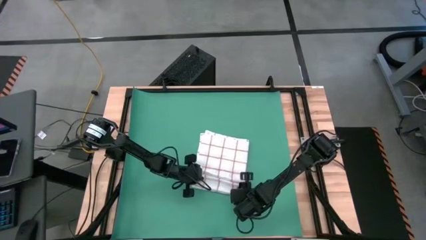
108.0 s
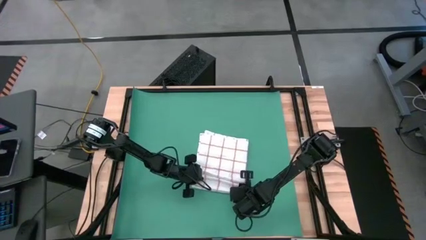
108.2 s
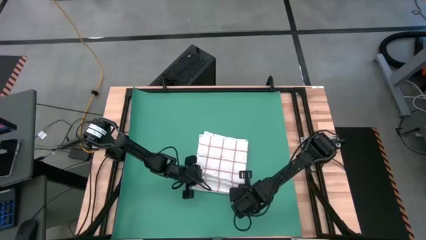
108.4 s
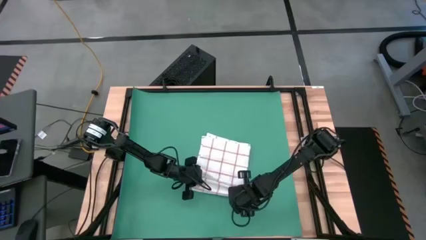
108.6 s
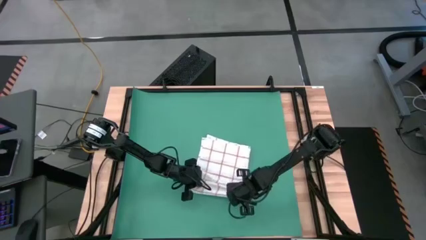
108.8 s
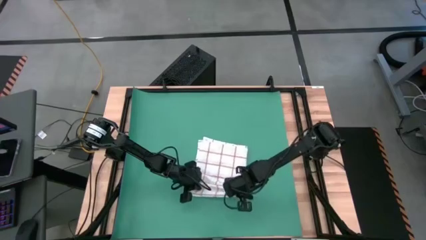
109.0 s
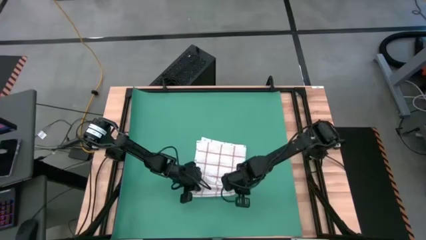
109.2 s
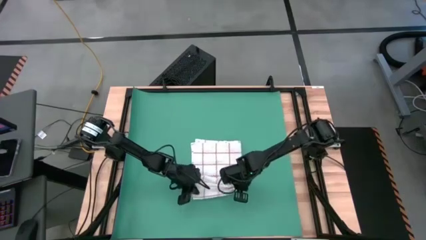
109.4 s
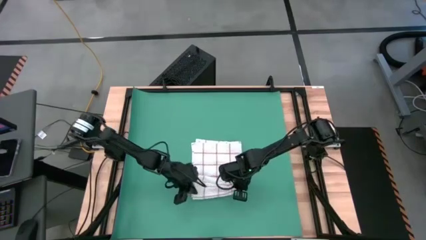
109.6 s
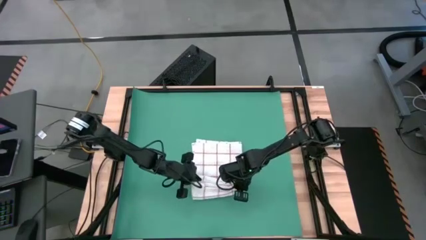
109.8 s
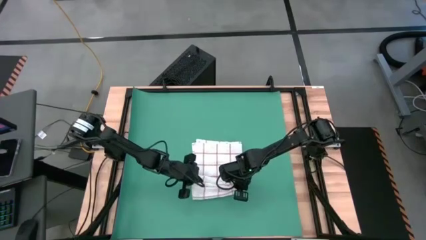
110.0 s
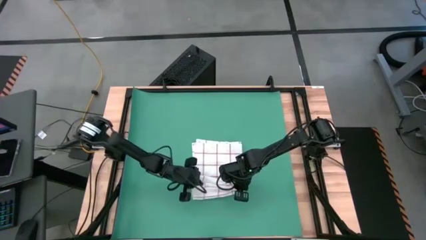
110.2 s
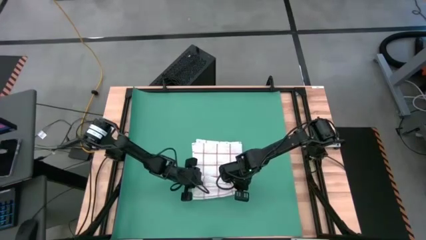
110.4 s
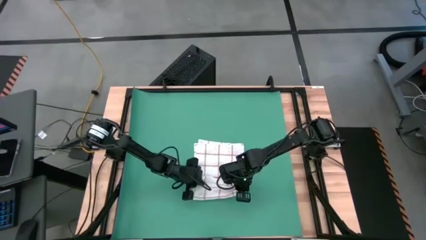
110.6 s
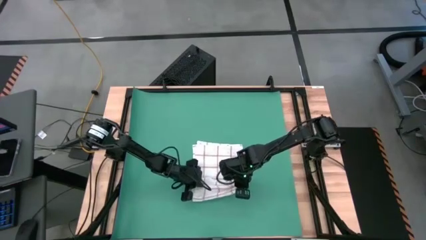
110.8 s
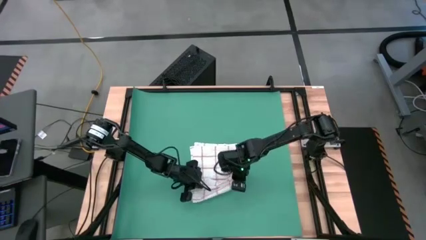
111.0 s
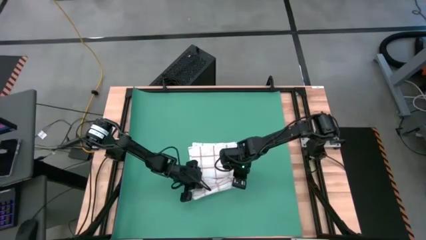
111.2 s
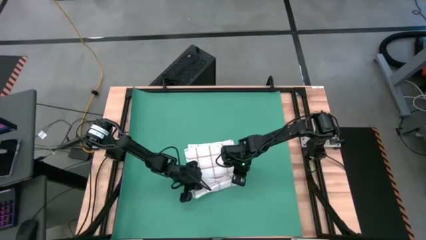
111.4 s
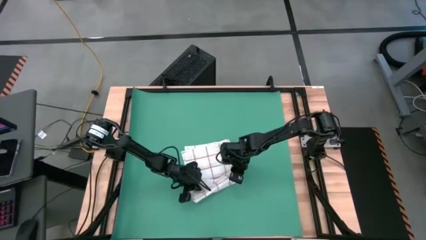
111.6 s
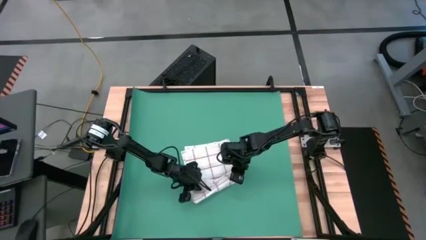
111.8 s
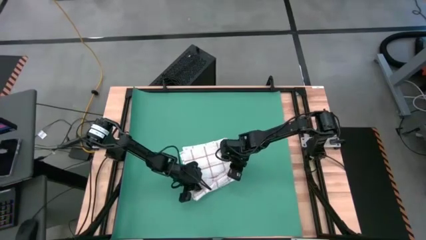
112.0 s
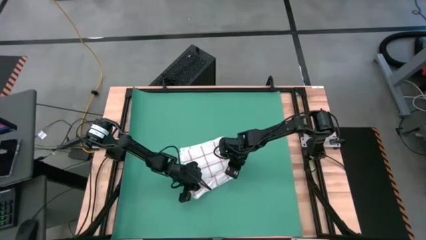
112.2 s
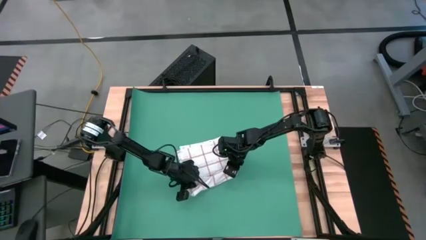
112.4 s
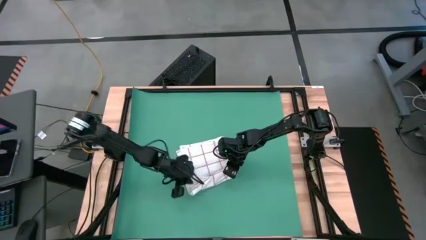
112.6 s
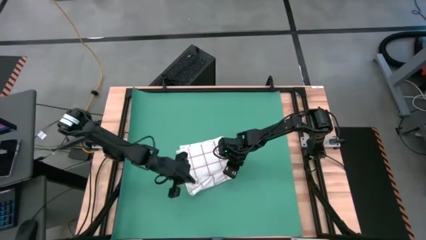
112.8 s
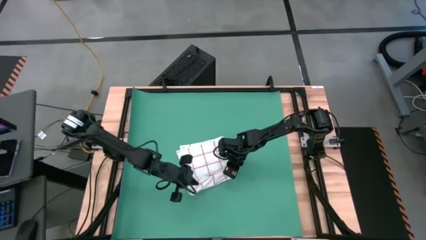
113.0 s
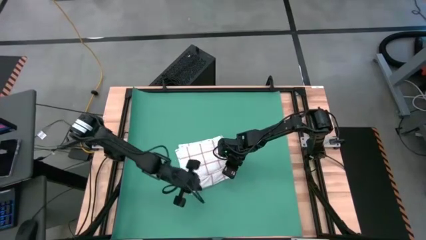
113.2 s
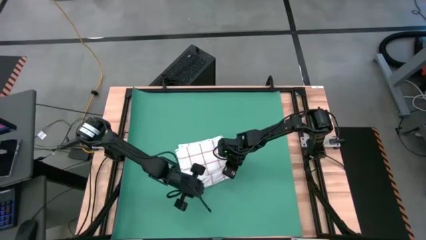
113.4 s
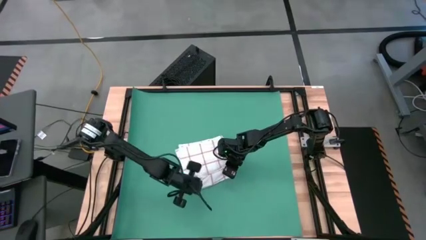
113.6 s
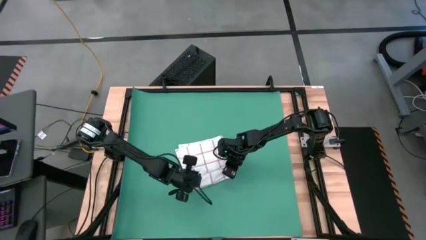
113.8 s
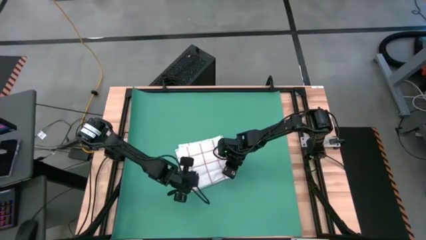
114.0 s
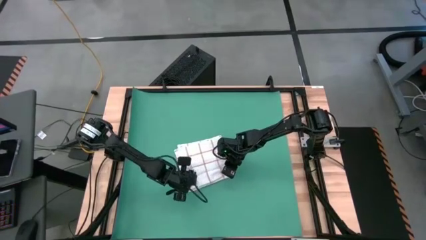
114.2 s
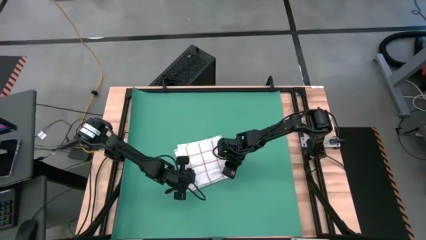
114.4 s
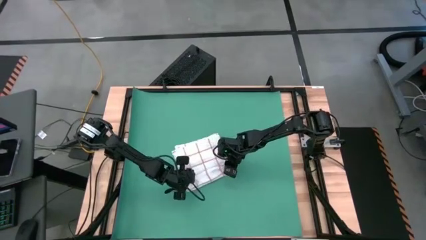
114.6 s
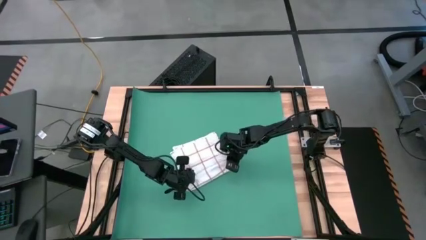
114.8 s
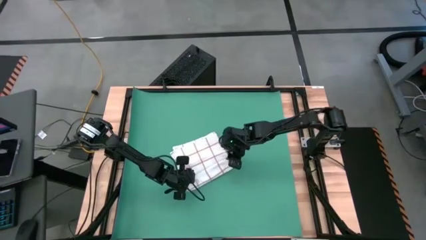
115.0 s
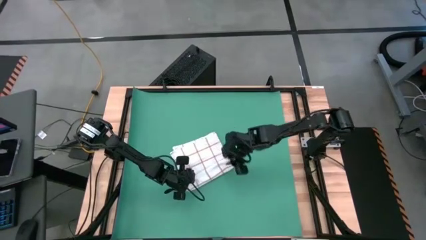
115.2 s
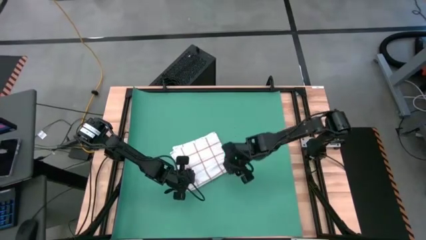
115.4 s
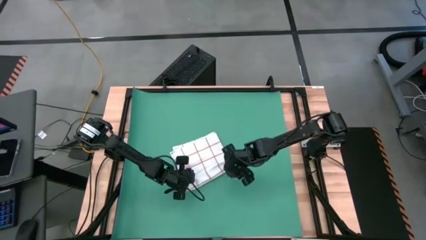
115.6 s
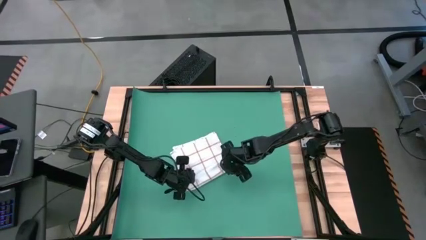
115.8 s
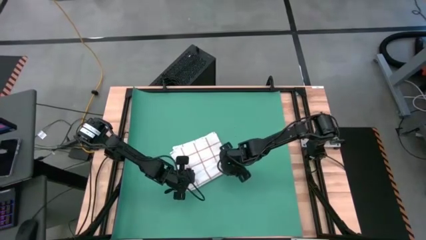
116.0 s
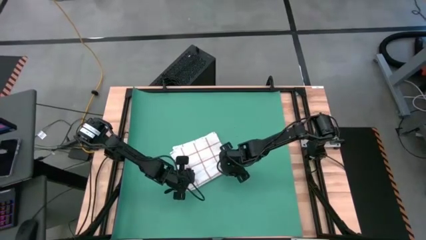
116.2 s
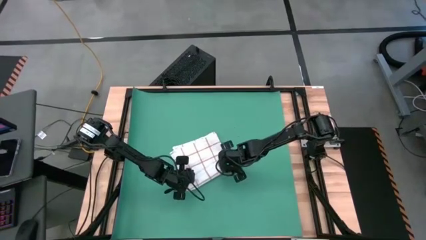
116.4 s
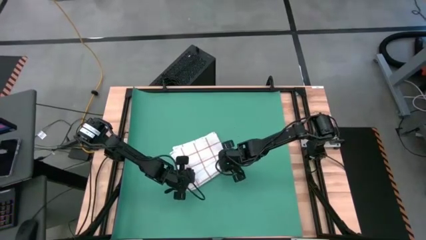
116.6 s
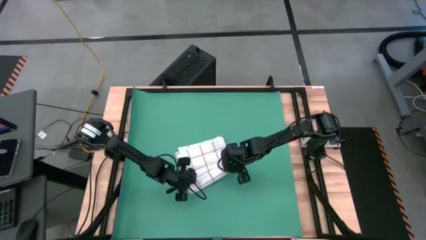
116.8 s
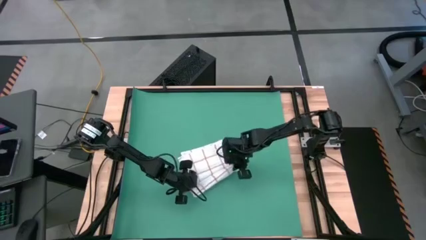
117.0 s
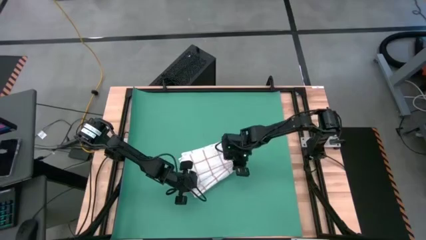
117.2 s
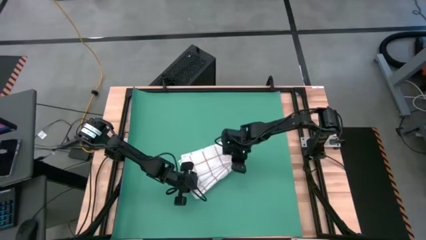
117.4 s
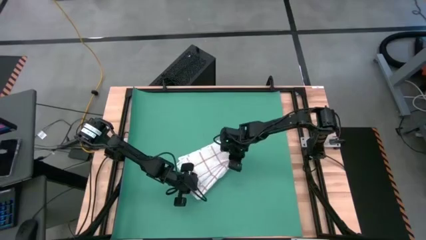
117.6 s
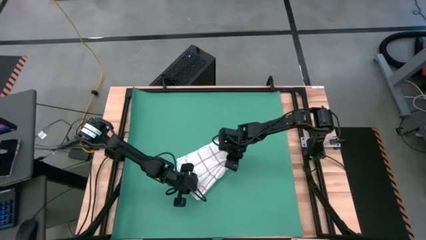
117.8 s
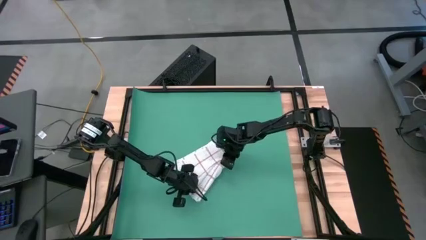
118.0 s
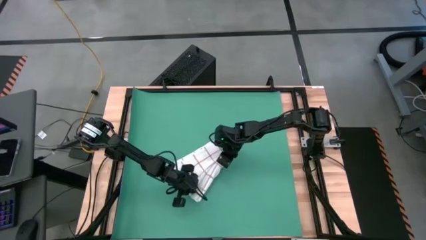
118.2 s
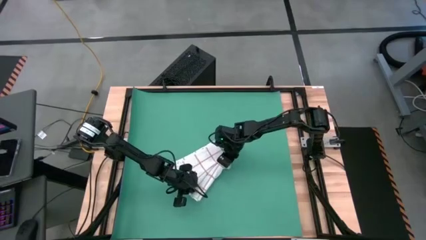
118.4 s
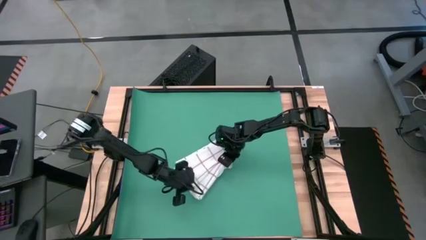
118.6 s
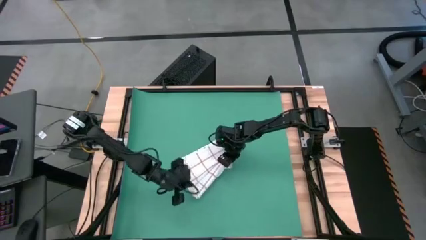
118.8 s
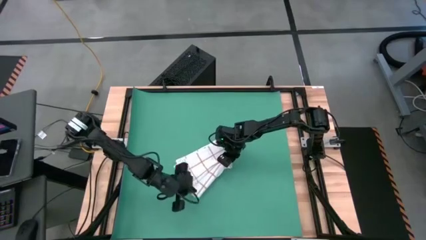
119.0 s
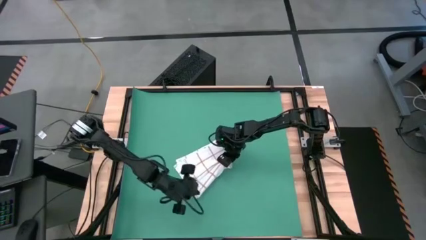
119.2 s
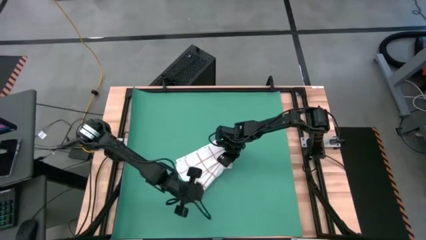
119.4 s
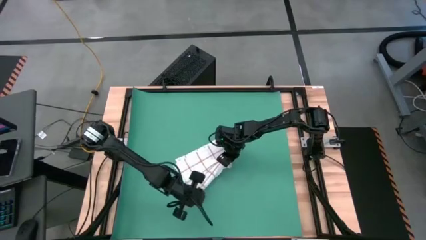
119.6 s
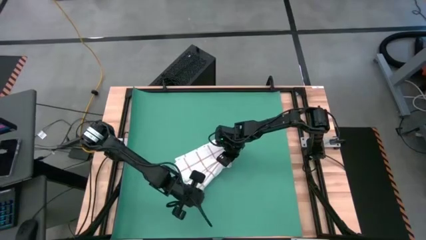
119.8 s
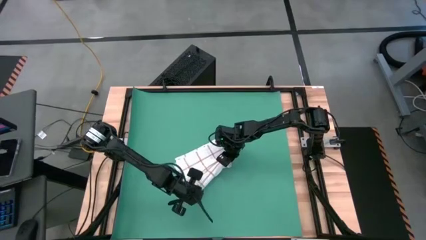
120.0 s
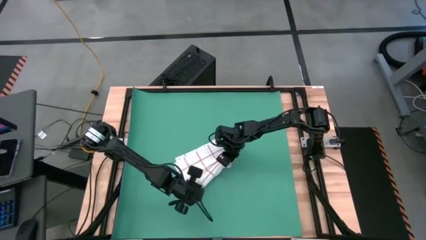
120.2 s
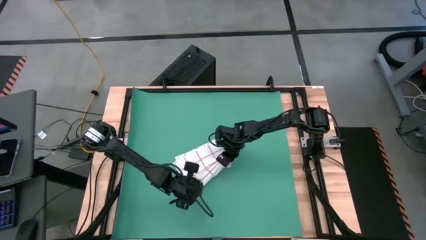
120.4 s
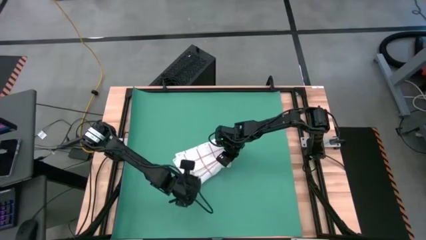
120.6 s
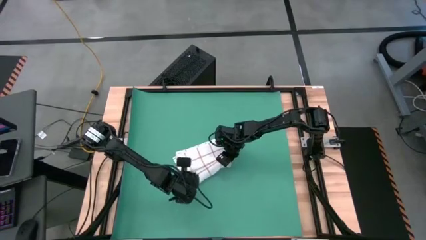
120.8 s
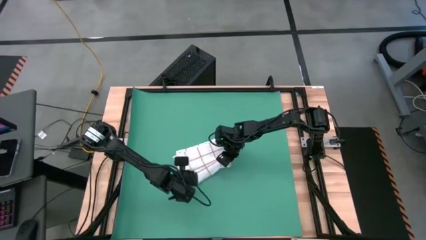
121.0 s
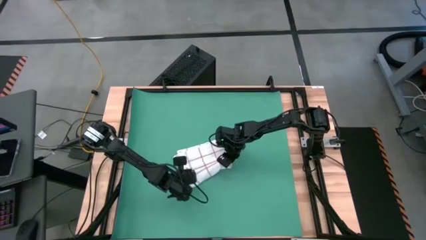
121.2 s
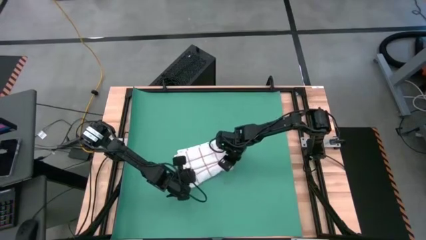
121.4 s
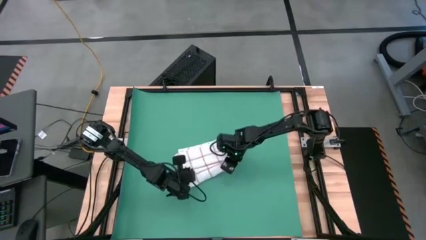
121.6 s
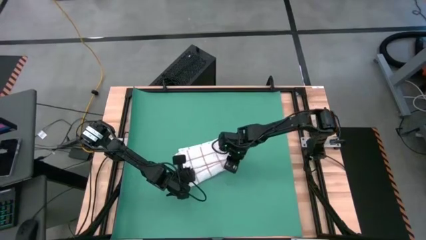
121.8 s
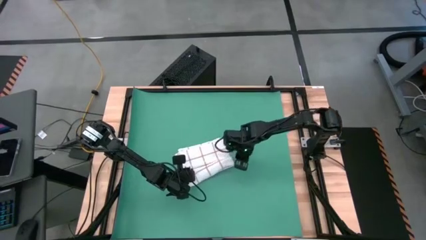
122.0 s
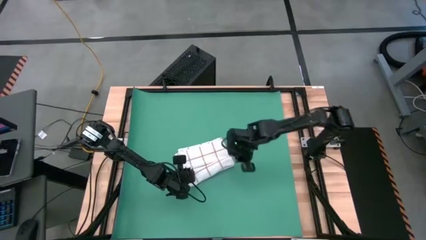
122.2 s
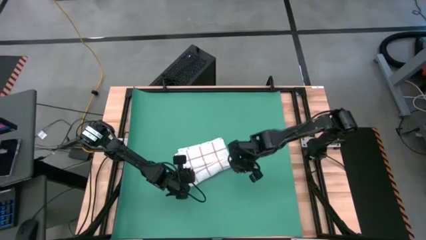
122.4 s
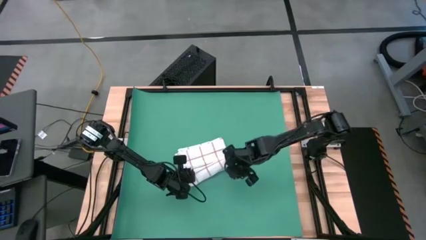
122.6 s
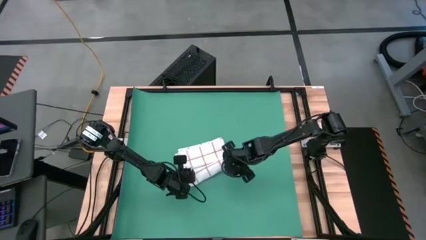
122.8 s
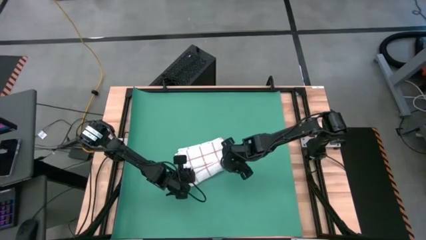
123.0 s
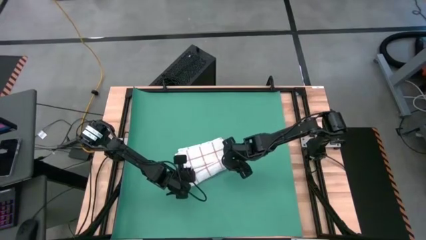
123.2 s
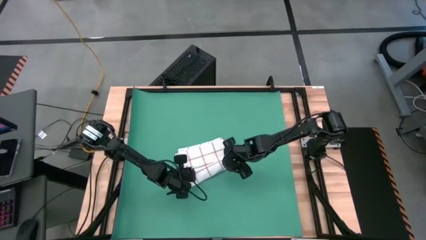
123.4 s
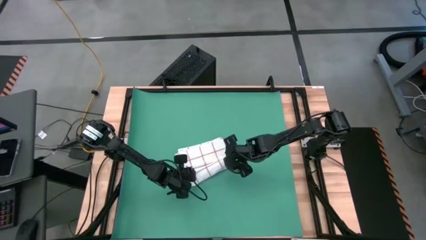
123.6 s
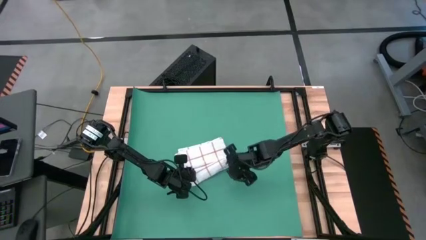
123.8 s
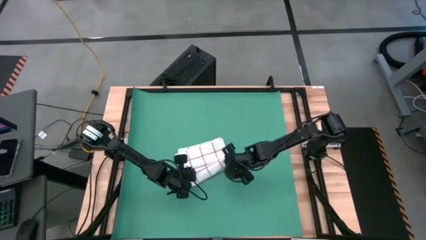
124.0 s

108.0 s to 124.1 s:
Task: Roll towel
Roll the white stripe towel
